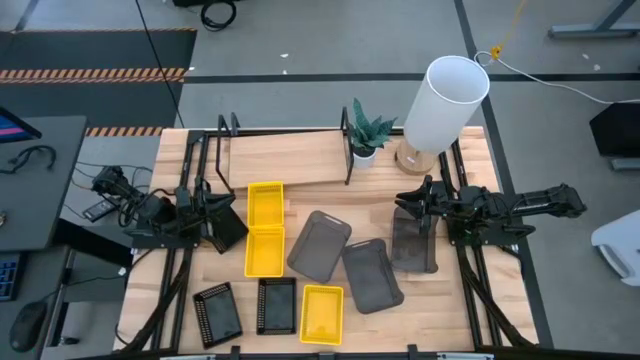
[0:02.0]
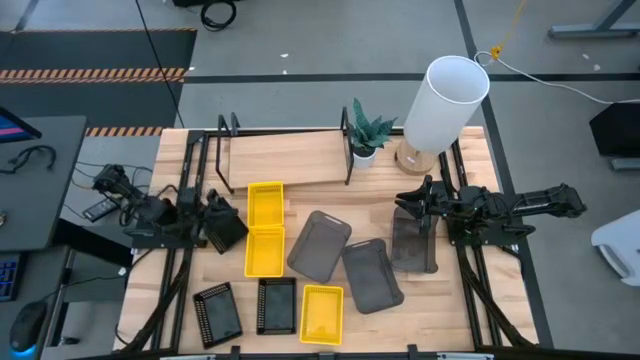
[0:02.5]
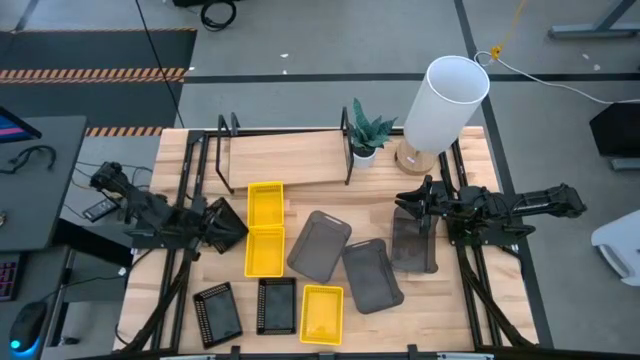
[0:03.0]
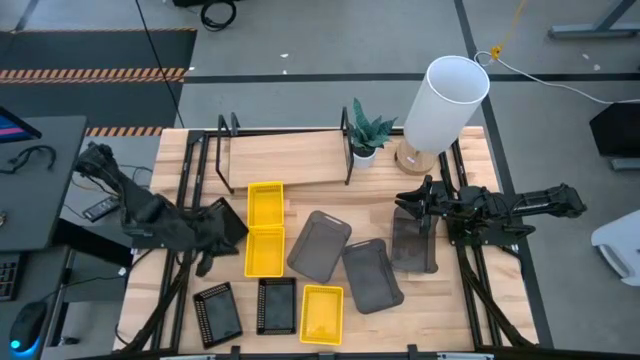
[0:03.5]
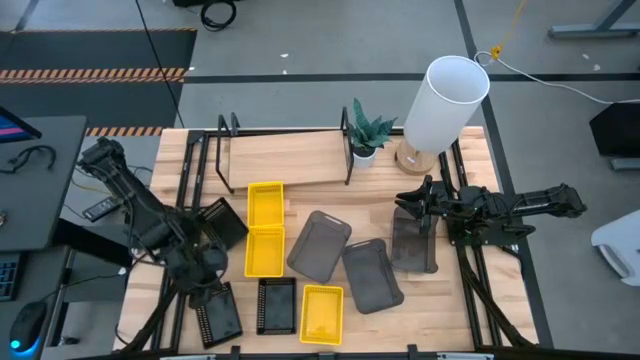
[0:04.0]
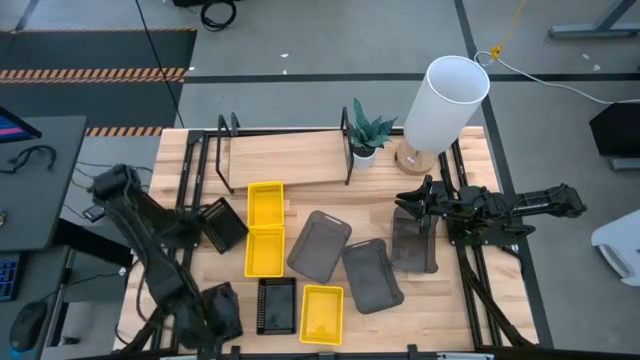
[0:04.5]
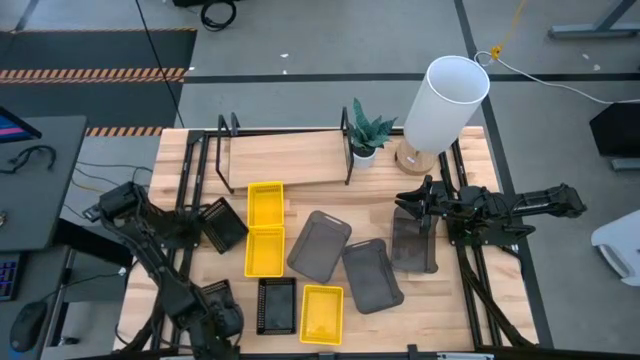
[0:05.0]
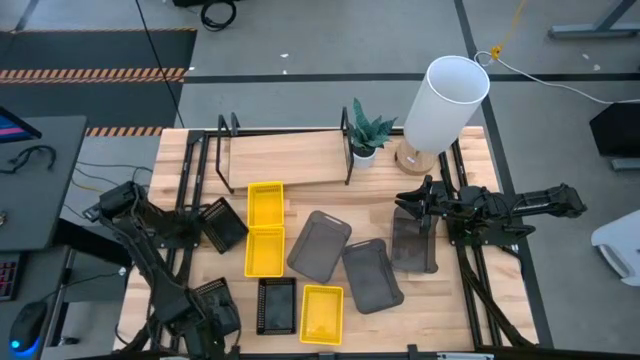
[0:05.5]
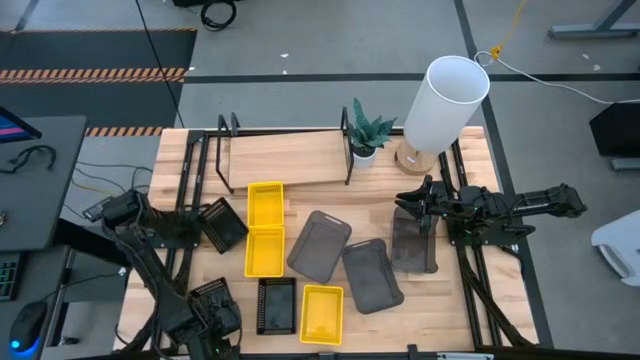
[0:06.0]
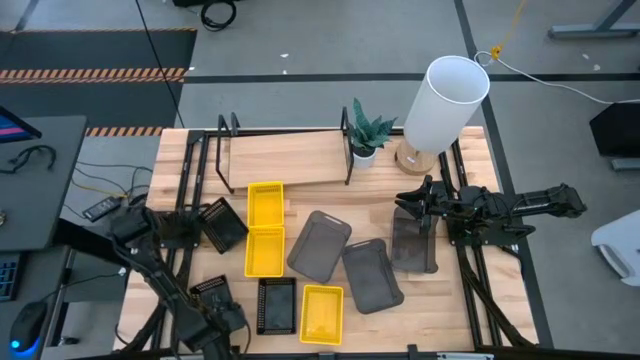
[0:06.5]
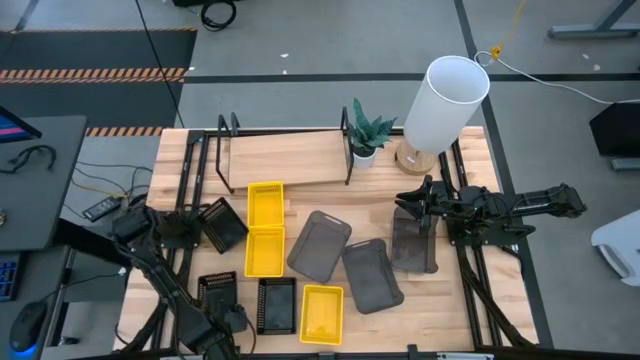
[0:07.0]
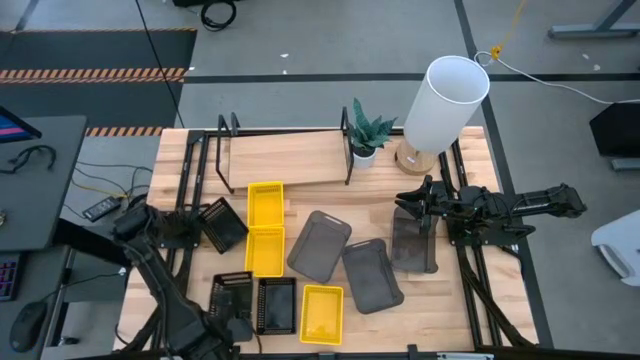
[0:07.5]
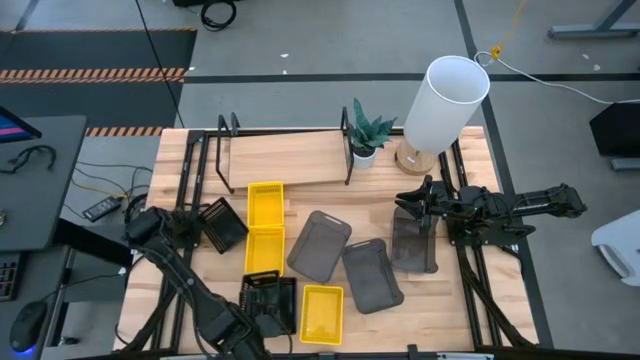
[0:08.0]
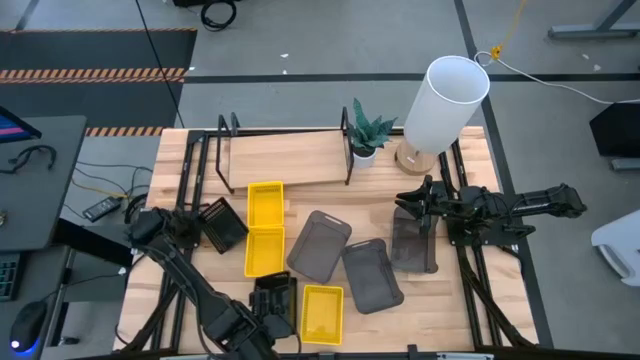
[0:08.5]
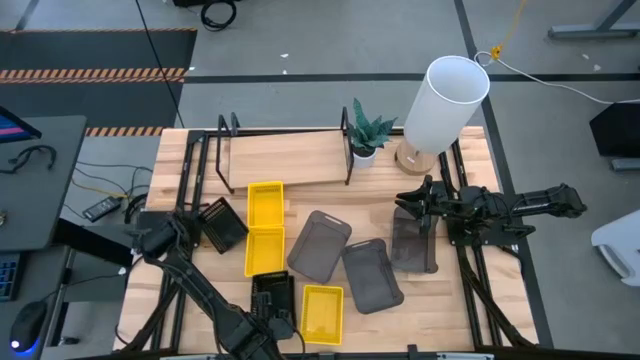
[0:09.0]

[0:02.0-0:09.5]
Task: Stack baskets on shelf by color
Stack the bottom left black basket on top of the bottom black basket

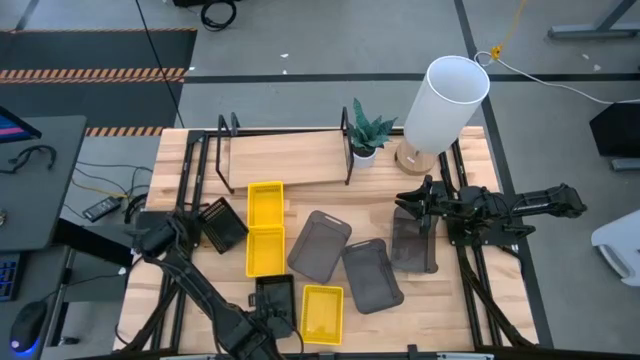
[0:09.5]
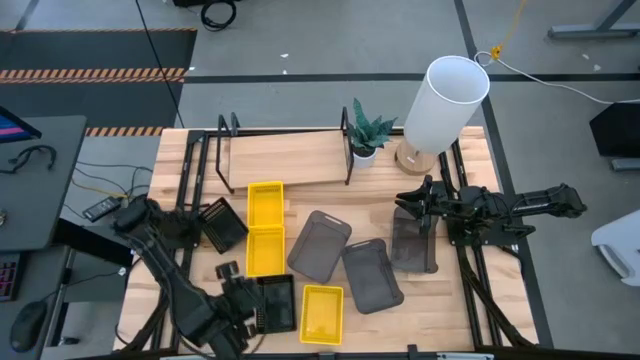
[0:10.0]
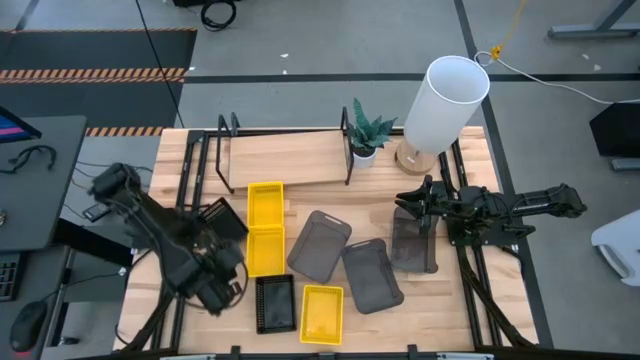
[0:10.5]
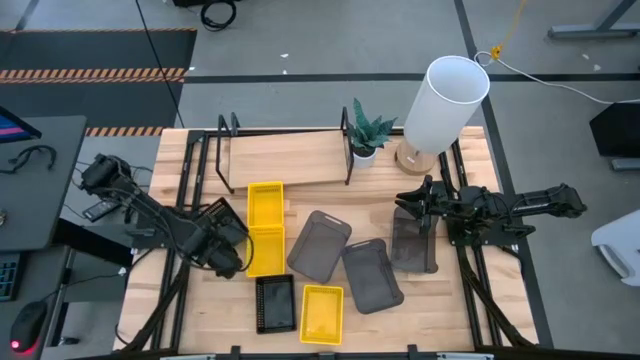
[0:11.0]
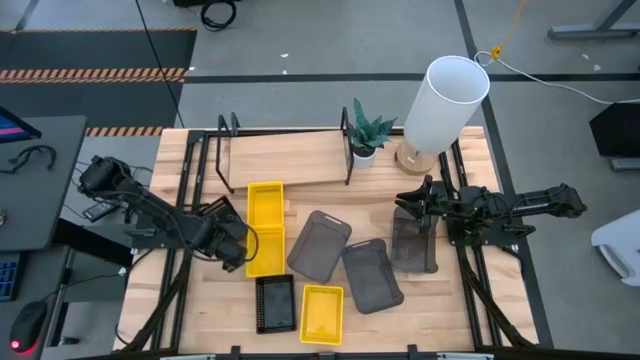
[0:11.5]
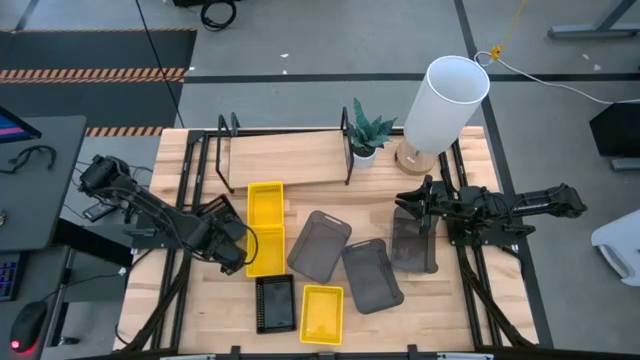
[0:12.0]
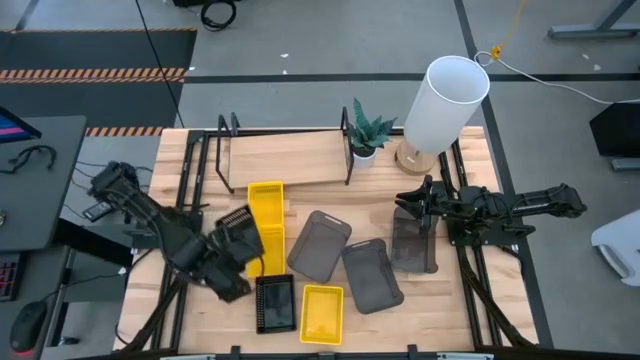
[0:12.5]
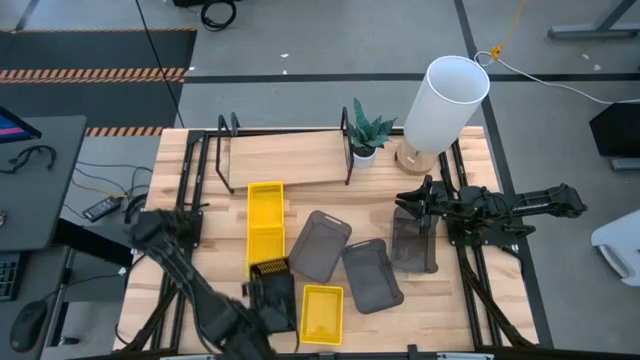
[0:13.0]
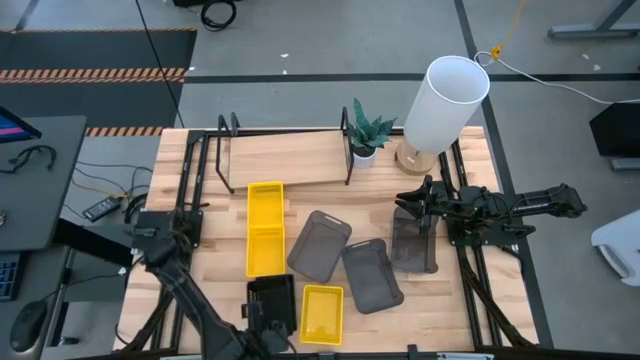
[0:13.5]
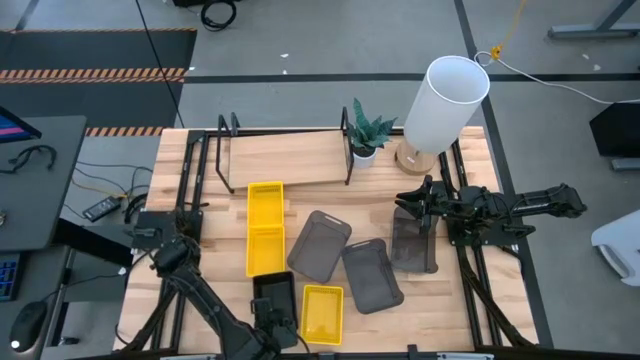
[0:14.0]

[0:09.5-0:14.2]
Stack the top black basket on top of the black basket

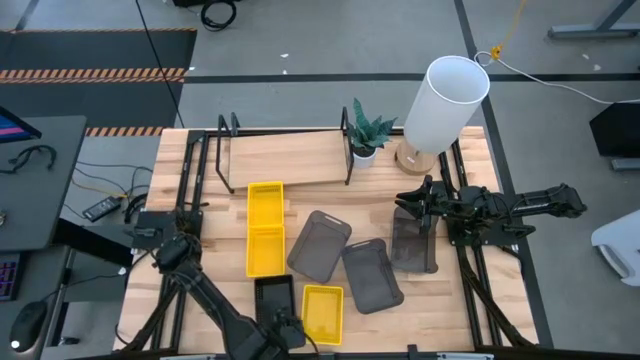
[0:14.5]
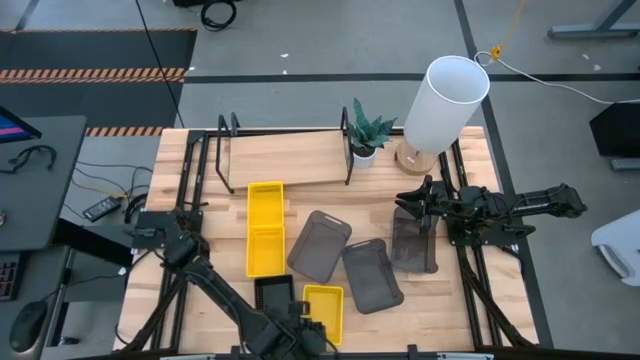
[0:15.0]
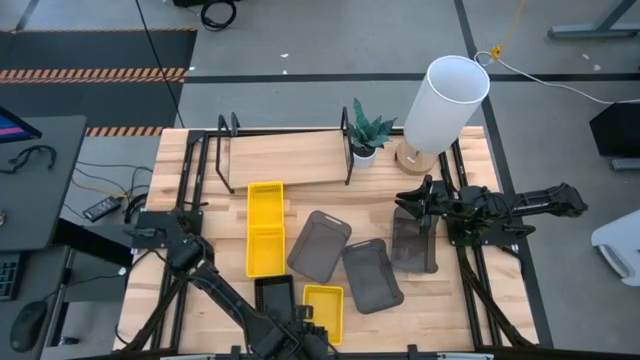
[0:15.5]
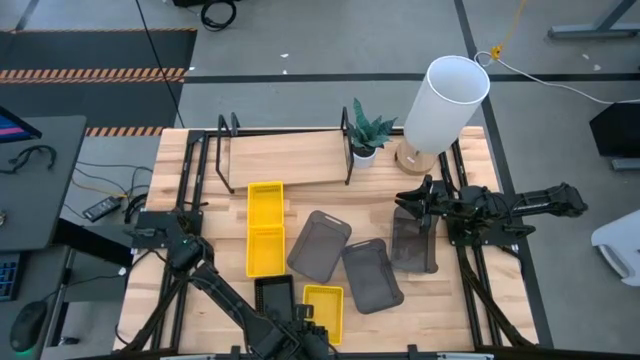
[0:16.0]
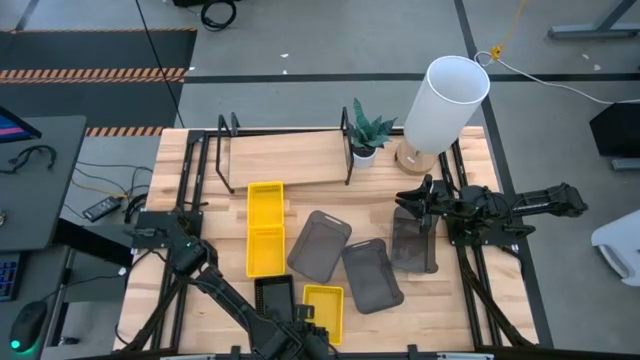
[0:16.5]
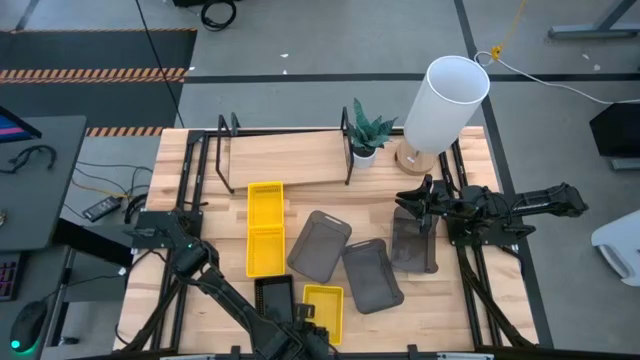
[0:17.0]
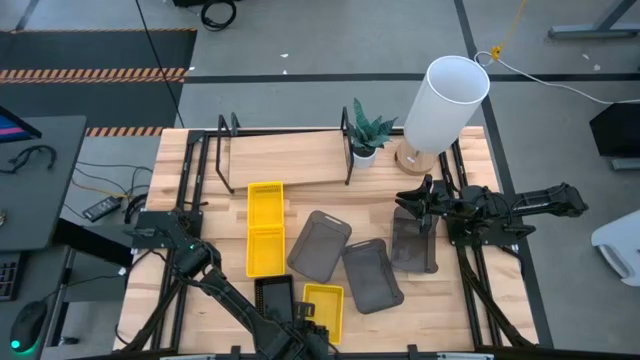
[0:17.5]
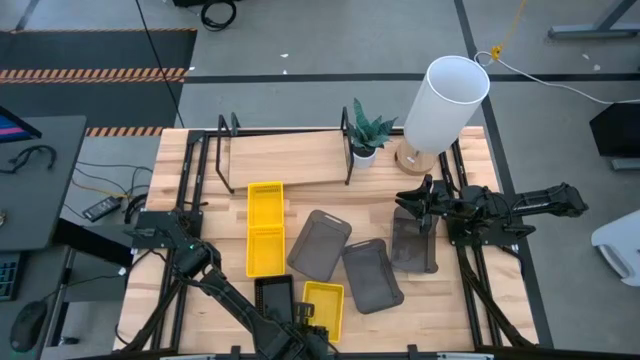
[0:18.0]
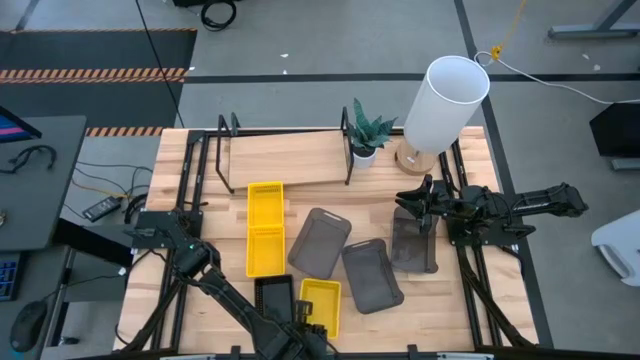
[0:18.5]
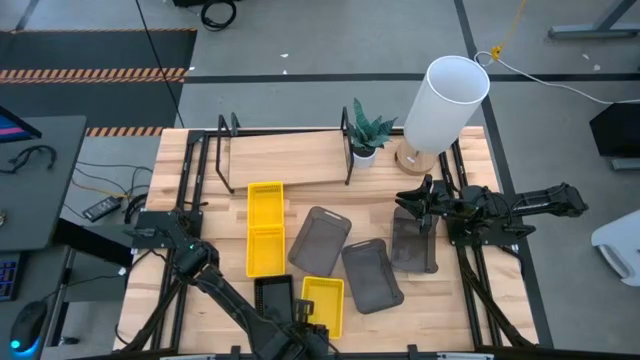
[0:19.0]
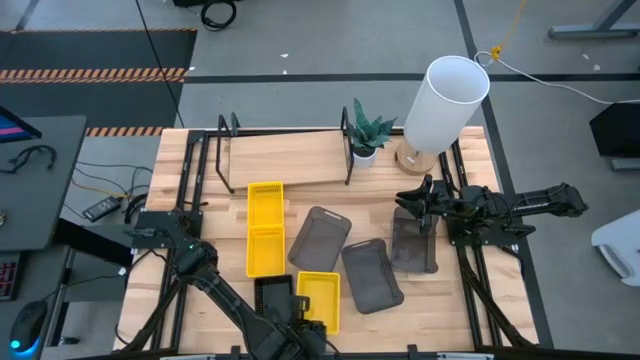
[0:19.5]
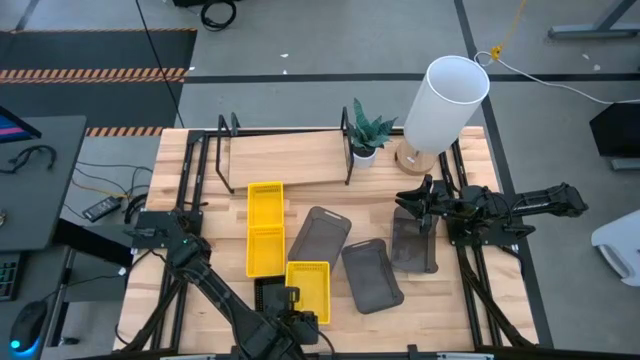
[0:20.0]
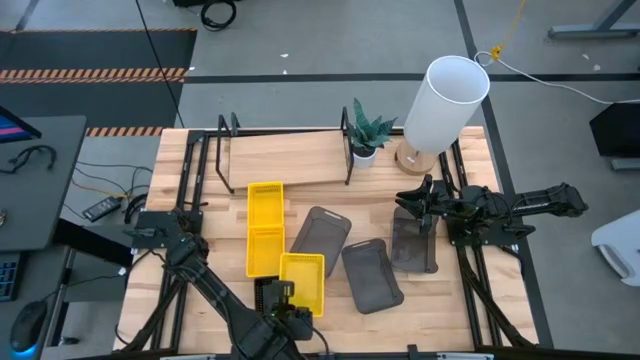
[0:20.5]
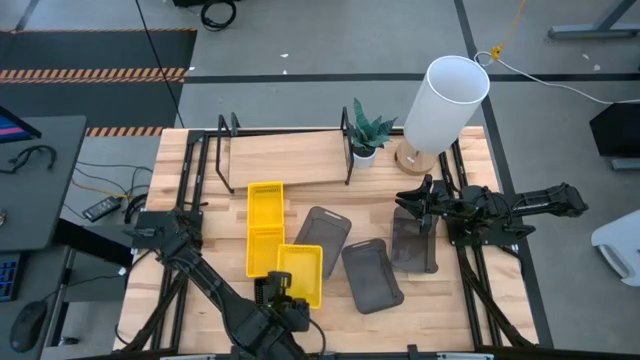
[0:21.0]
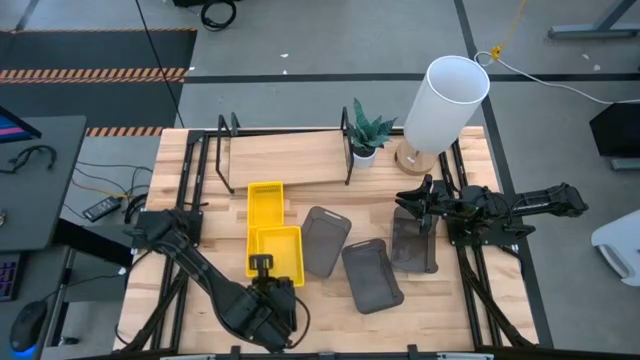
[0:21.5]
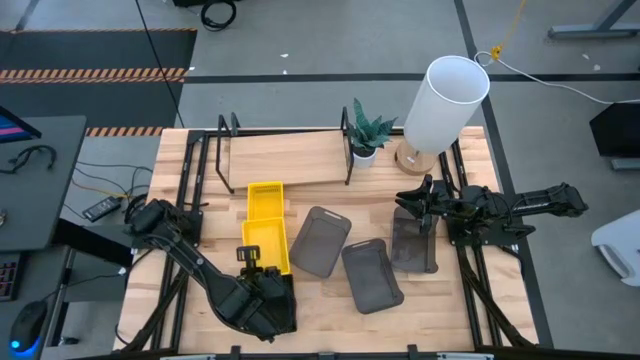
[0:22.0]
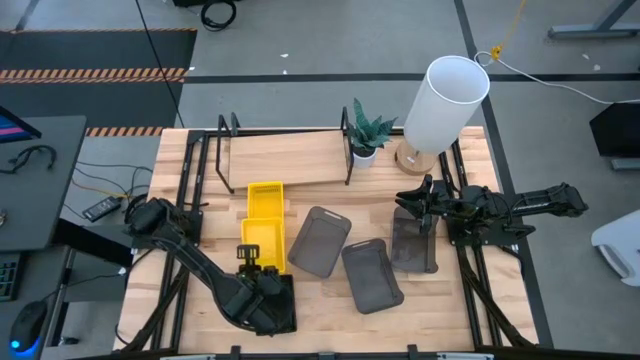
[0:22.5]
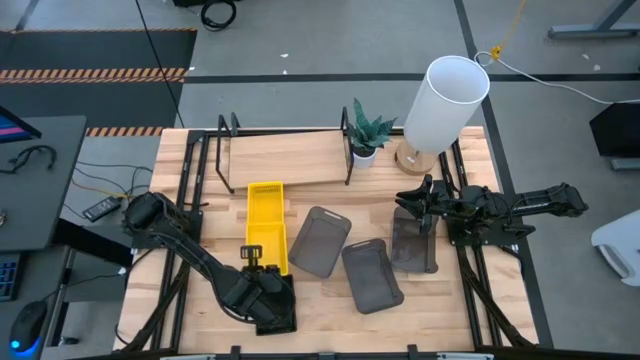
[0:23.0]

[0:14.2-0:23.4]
Stack the bottom yellow basket on top of the middle yellow basket
